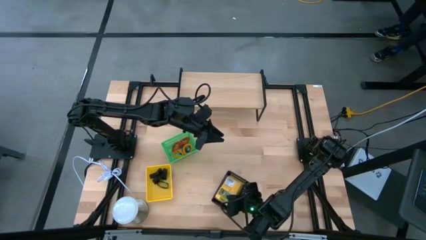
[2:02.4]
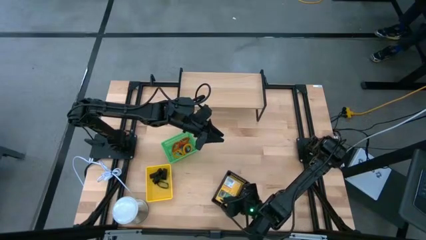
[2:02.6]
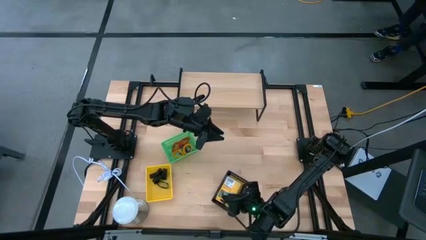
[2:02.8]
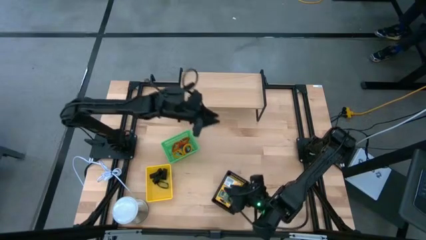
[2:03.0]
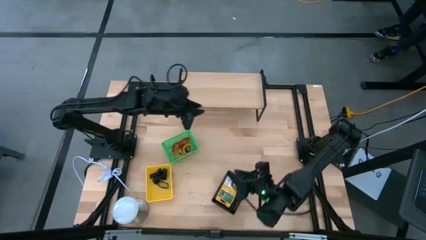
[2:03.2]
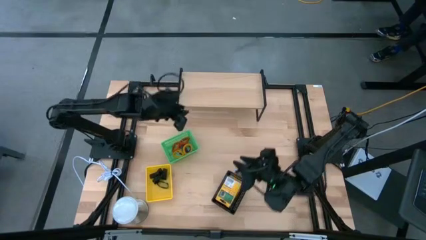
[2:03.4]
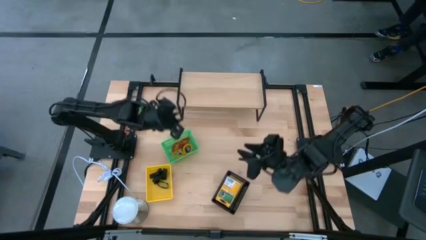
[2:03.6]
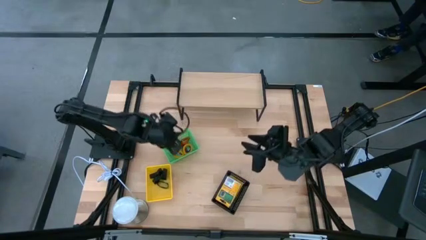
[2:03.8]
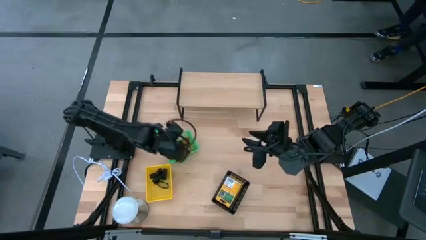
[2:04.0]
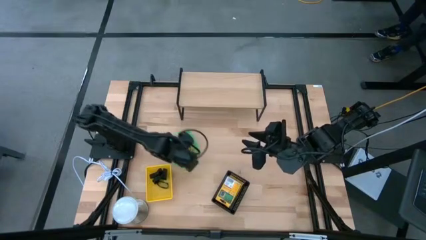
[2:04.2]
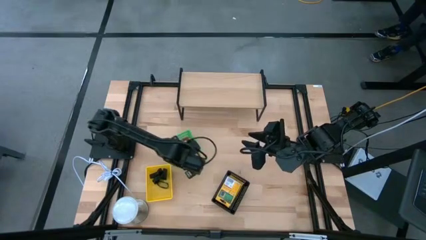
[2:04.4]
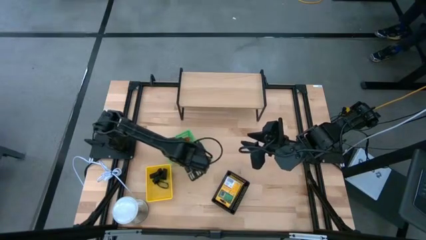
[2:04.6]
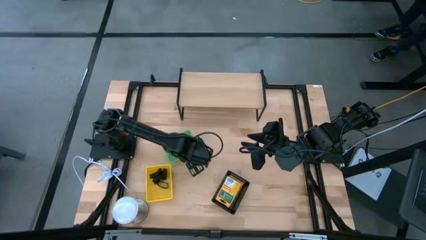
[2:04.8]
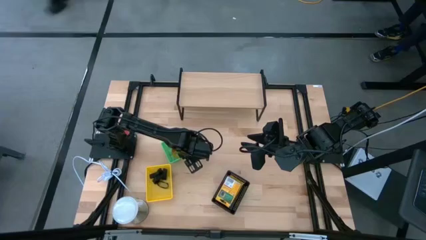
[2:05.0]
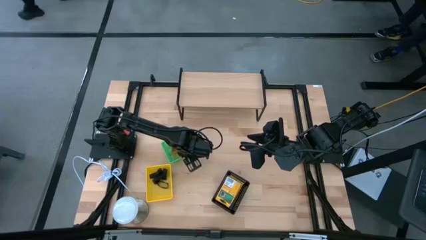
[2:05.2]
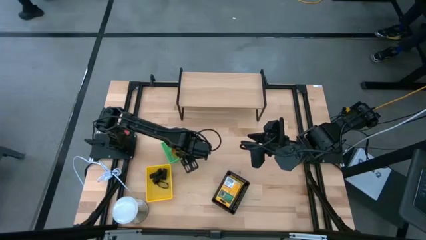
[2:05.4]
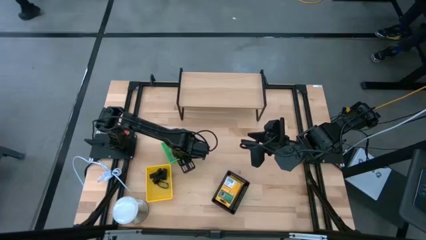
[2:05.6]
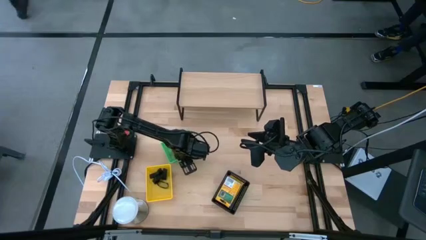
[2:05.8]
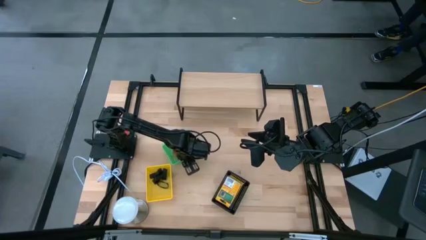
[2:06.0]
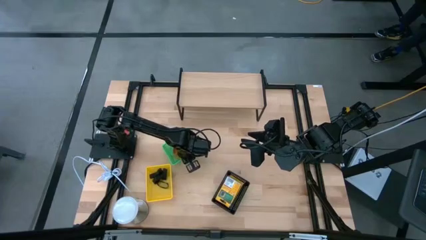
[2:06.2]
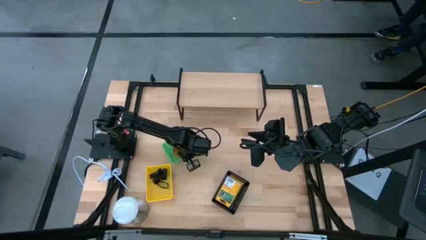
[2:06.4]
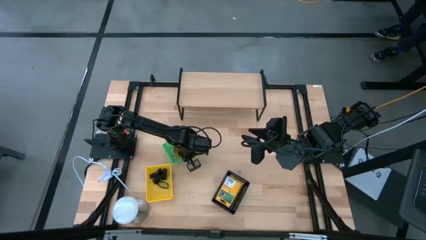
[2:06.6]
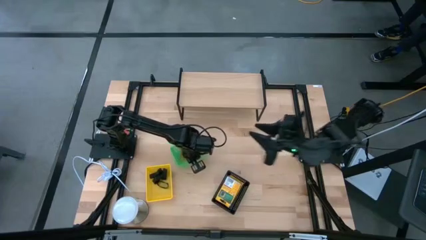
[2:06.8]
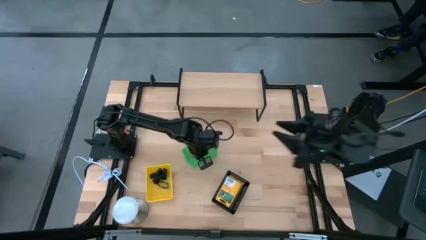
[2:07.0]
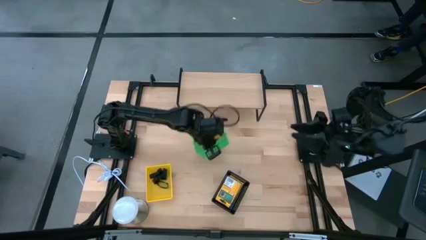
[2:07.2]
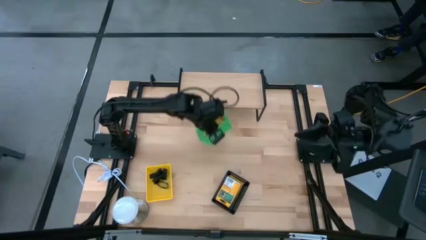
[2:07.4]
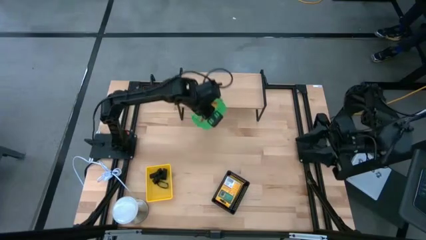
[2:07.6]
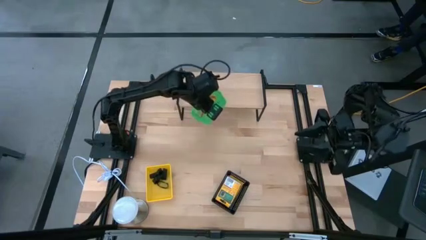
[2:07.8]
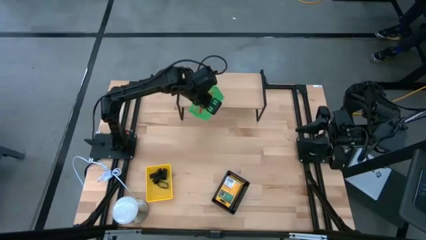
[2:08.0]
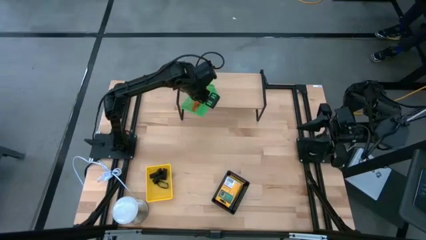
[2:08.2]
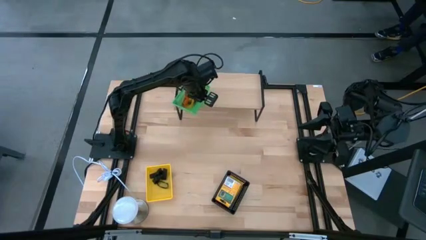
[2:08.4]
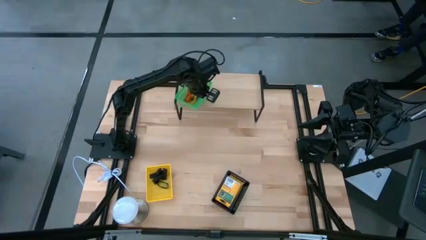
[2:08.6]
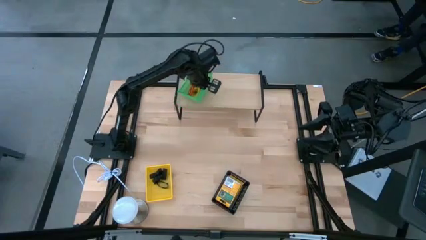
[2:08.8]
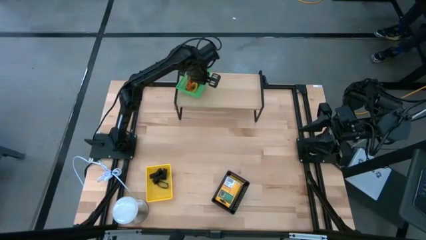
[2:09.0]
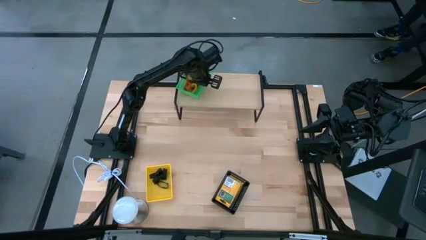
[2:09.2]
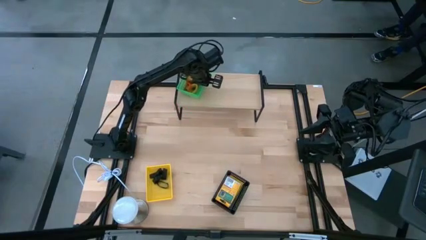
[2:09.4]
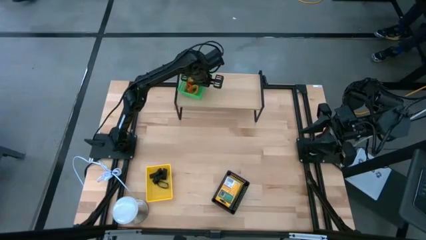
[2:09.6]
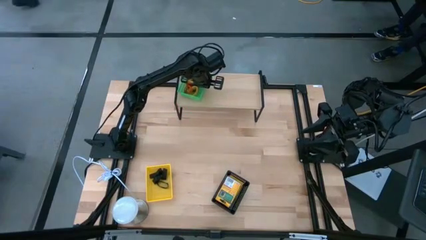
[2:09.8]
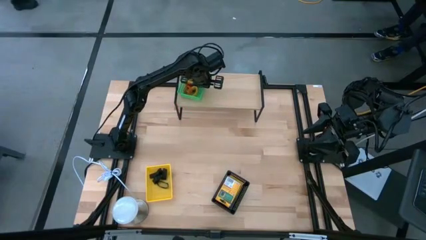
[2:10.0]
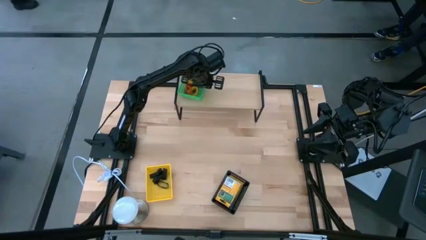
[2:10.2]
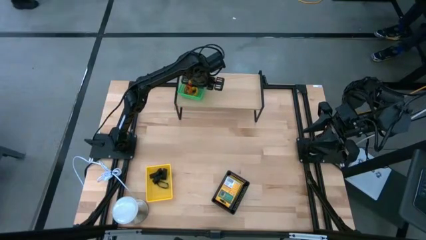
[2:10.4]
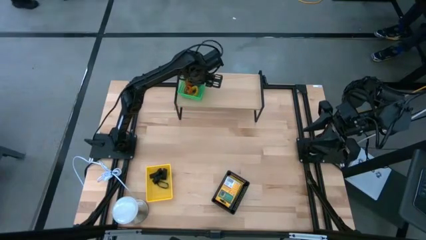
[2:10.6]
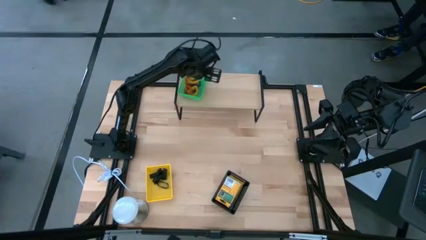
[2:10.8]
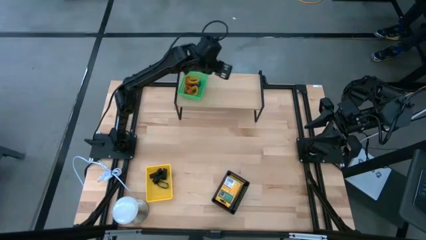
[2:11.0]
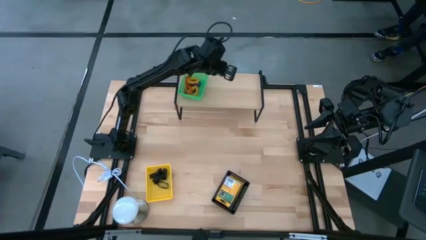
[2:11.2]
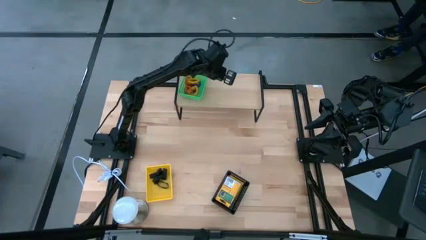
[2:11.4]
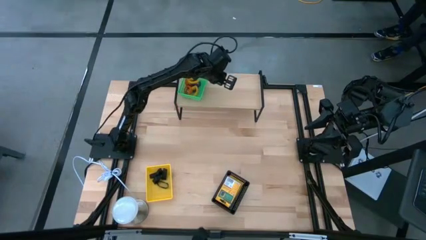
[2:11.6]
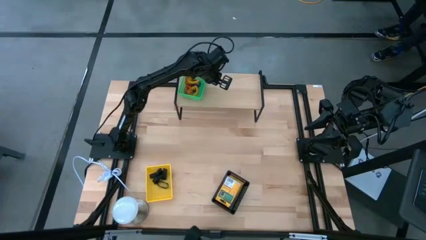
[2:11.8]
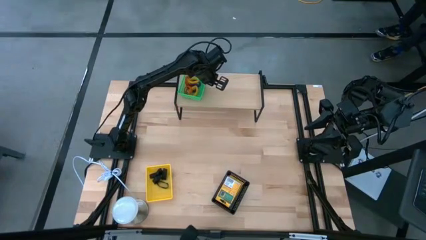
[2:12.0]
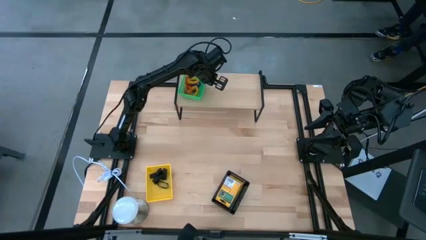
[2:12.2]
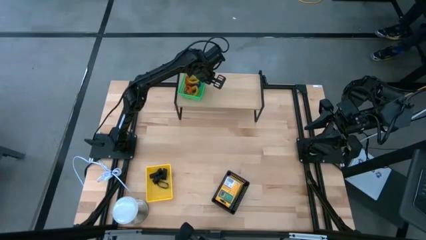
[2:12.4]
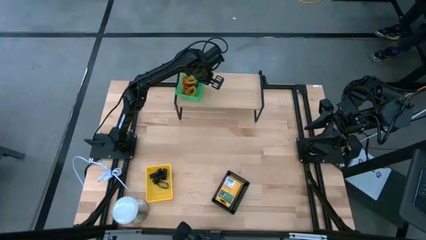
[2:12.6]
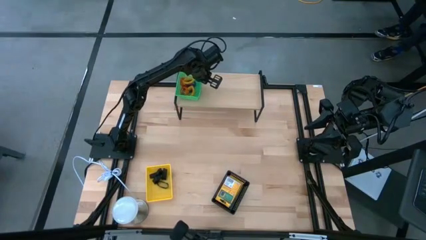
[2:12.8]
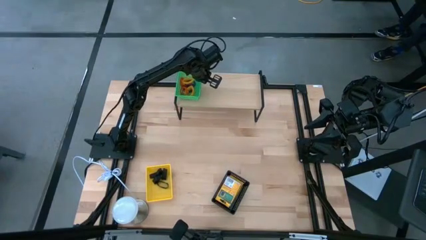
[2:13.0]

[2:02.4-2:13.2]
Task: Pick & Place Office Desk Supplies
Put the green basket on the shelf

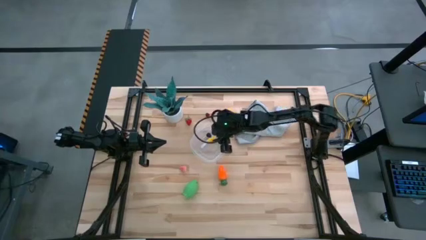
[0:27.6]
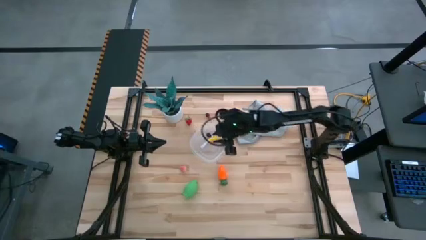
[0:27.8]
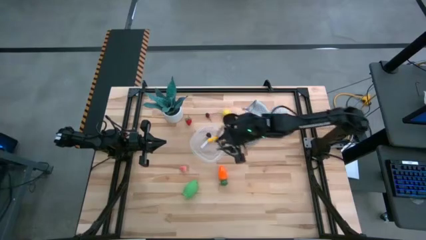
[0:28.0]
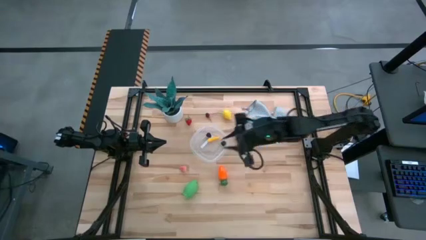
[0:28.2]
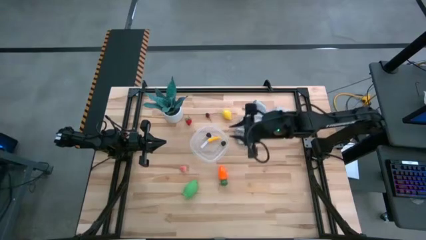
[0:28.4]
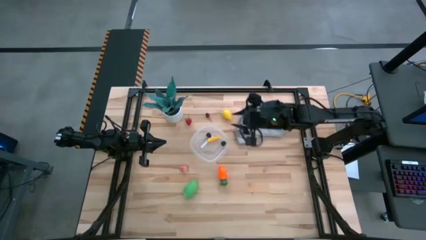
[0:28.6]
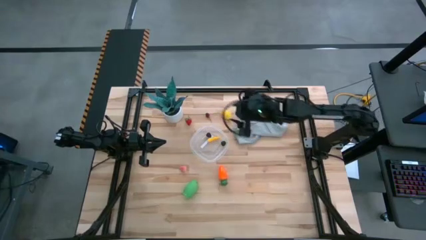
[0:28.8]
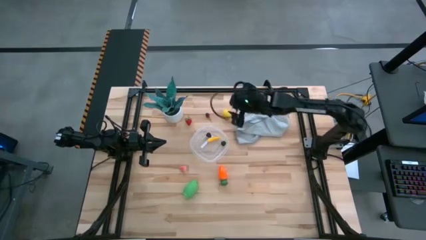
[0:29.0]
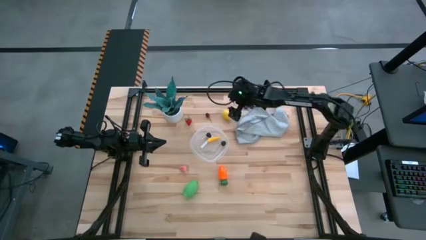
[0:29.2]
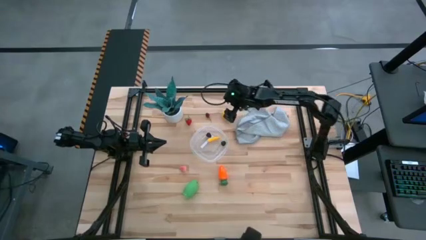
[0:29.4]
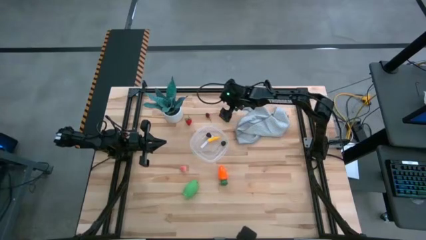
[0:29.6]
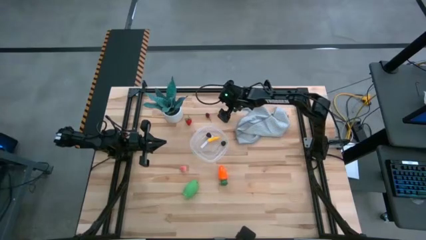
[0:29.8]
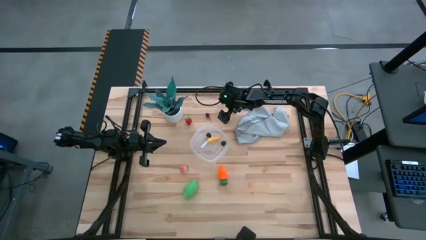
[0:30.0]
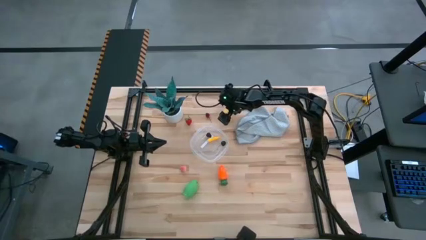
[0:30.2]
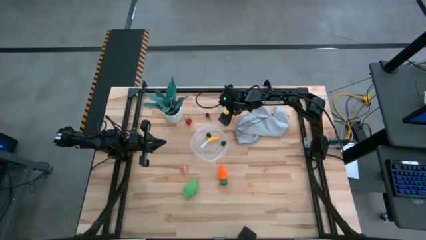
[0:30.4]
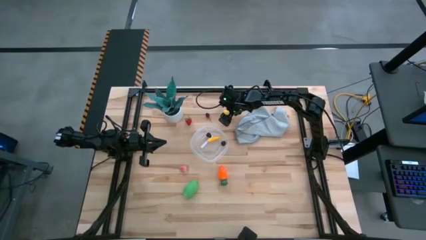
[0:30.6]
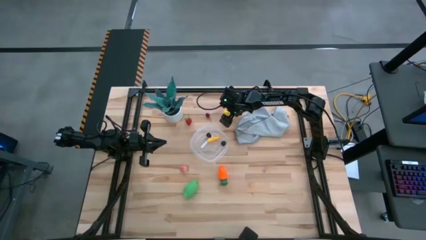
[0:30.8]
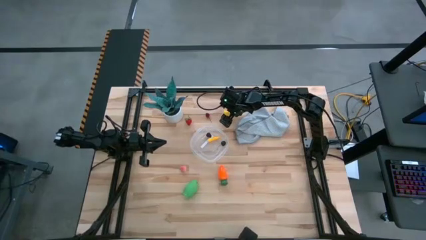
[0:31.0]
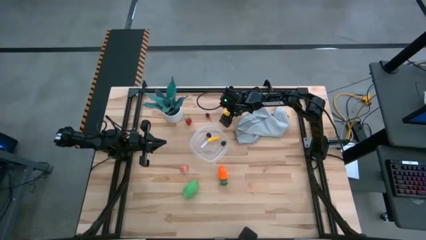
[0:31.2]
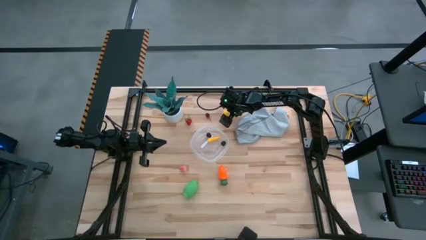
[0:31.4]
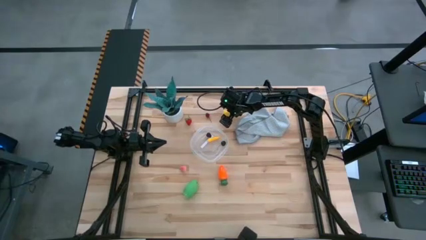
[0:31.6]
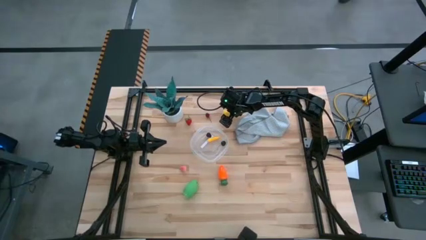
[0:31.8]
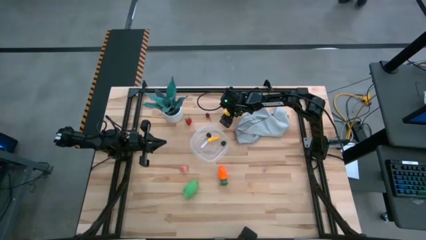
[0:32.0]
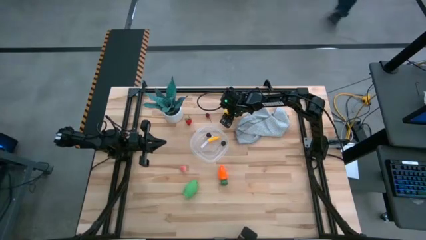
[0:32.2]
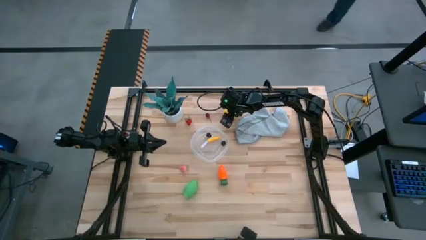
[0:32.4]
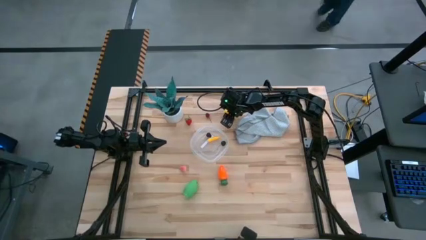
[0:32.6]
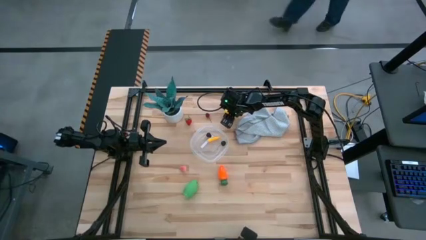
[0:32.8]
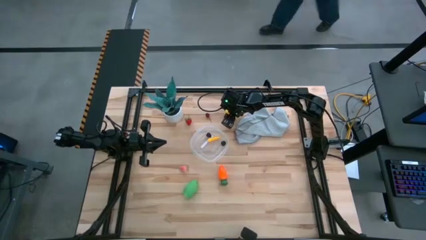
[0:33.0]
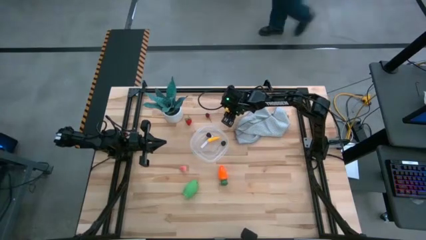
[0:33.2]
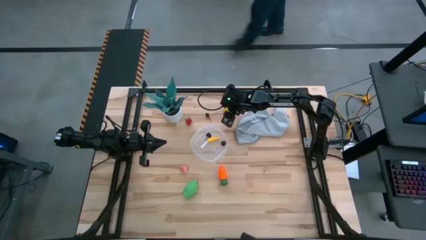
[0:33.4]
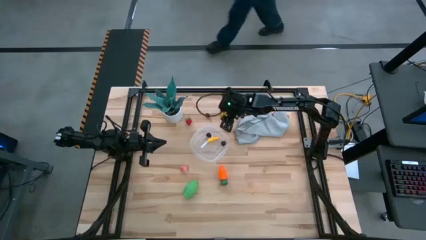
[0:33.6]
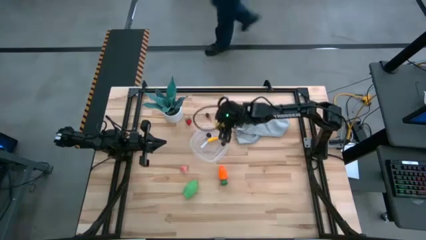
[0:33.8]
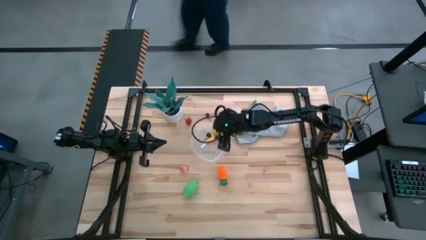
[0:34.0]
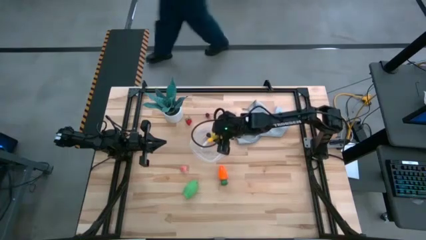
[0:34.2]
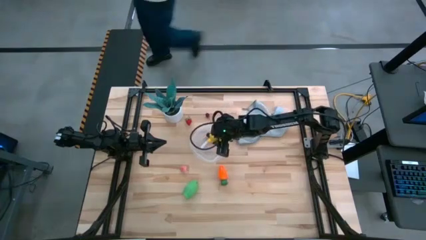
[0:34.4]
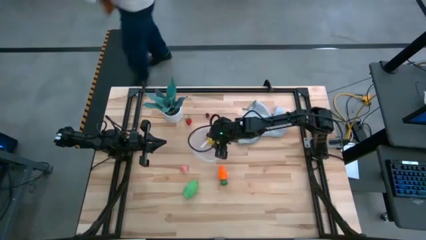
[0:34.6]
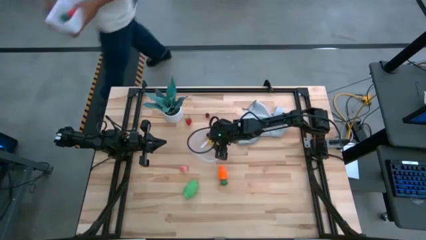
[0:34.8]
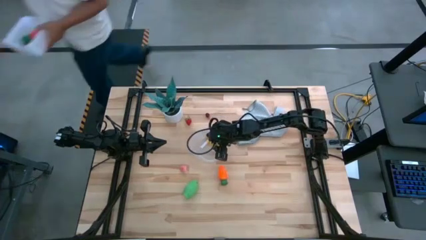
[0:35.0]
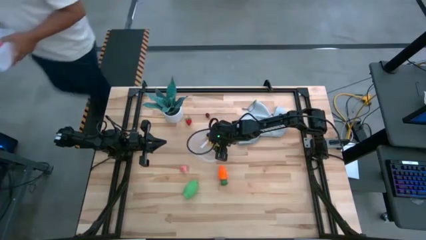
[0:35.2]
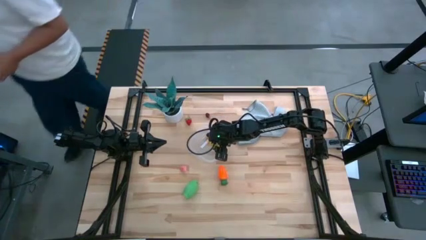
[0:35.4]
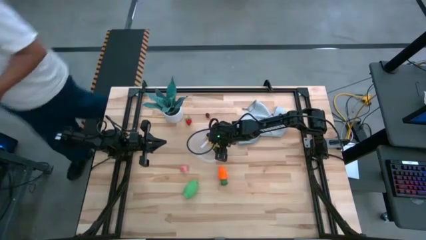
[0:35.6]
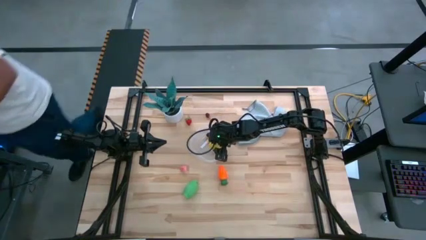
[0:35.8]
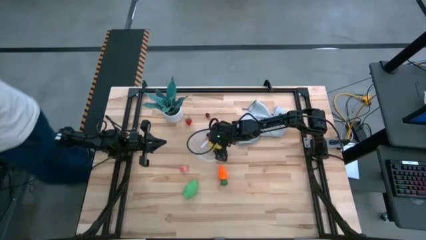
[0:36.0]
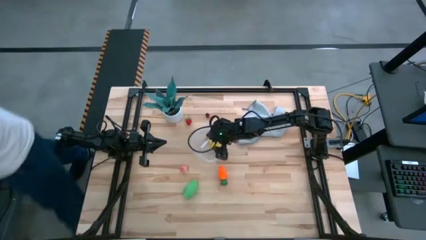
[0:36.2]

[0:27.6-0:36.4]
Task: Pick and placing Produce into tupperware
Put the yellow lemon into the transparent bin
